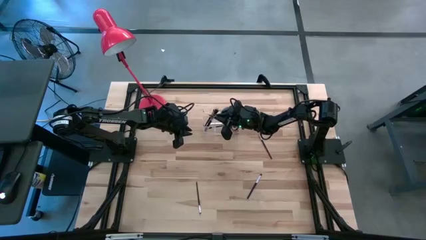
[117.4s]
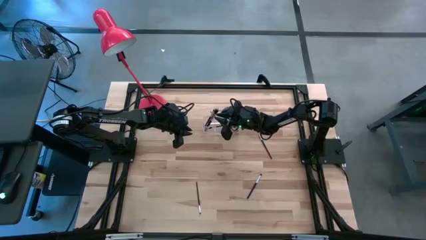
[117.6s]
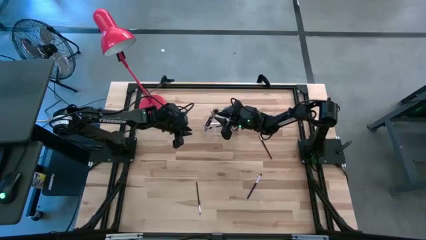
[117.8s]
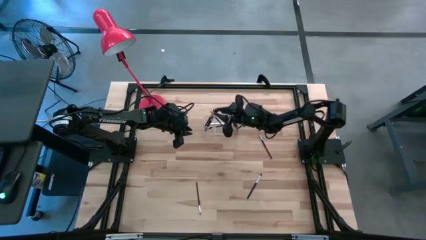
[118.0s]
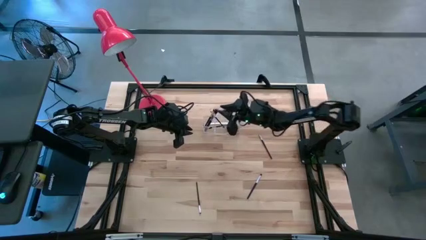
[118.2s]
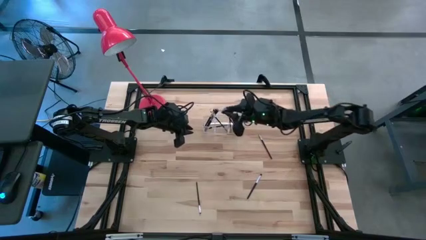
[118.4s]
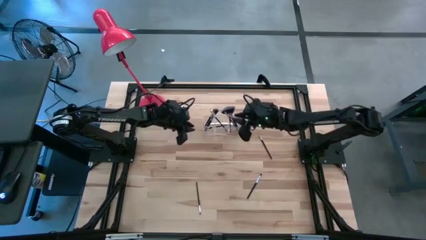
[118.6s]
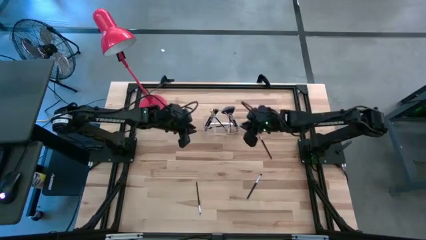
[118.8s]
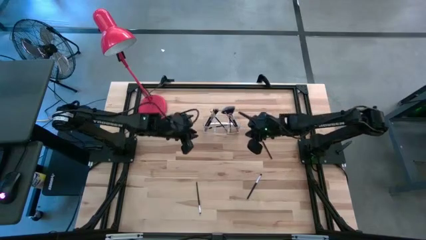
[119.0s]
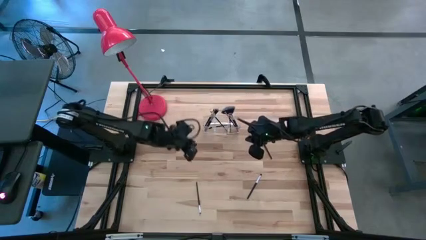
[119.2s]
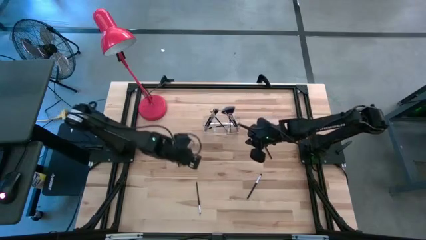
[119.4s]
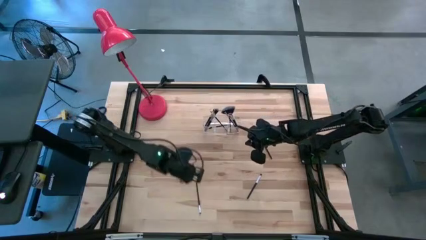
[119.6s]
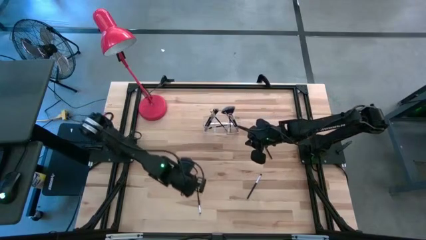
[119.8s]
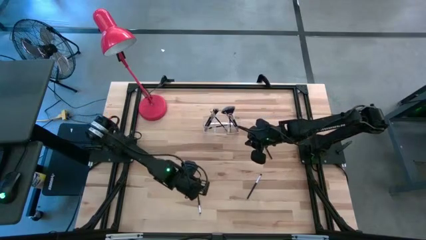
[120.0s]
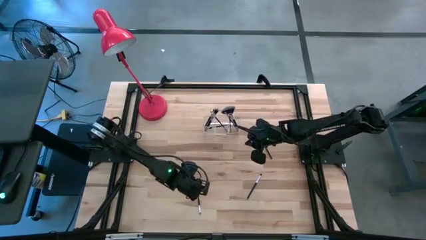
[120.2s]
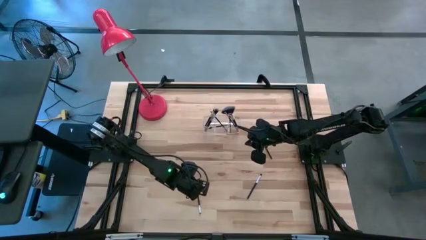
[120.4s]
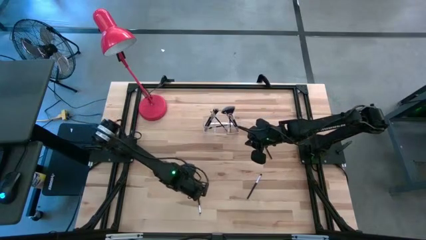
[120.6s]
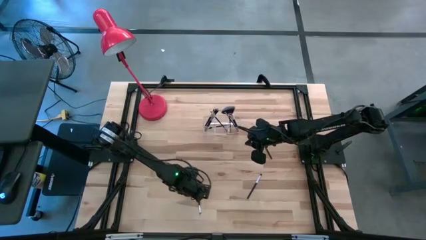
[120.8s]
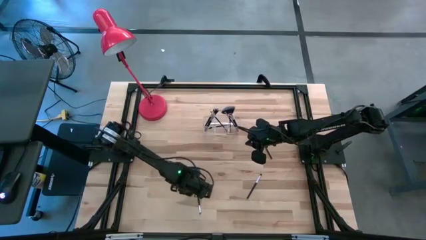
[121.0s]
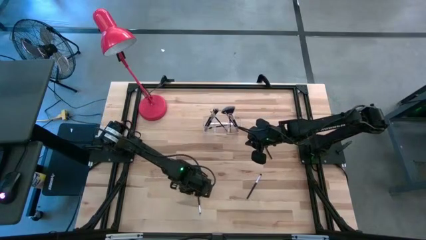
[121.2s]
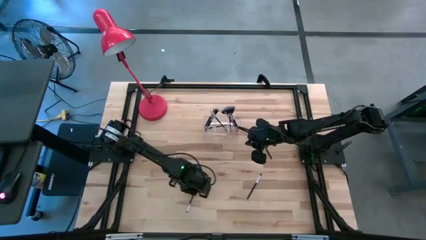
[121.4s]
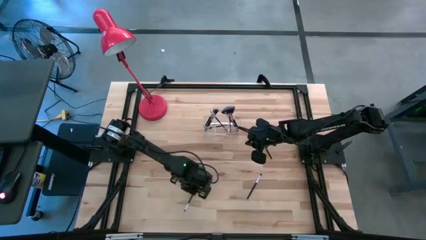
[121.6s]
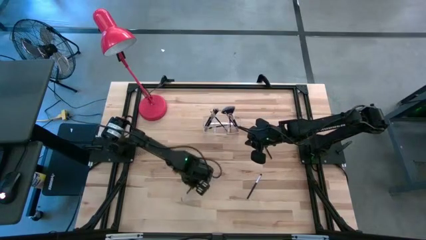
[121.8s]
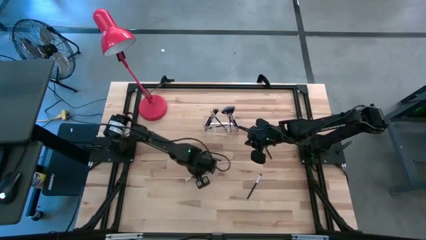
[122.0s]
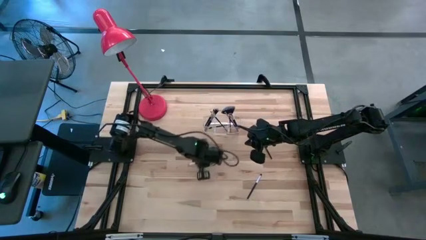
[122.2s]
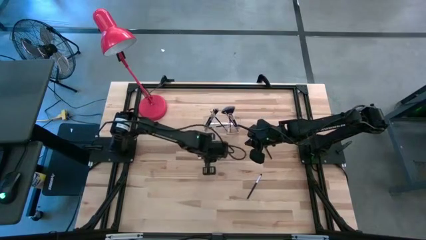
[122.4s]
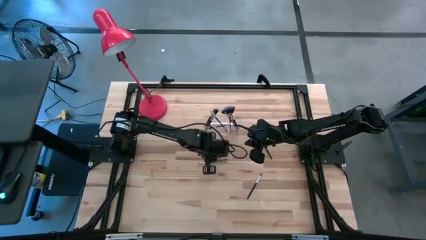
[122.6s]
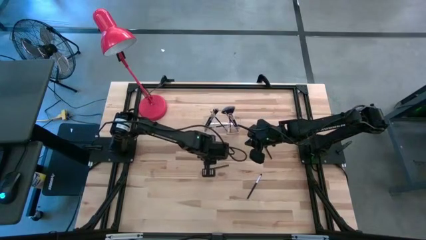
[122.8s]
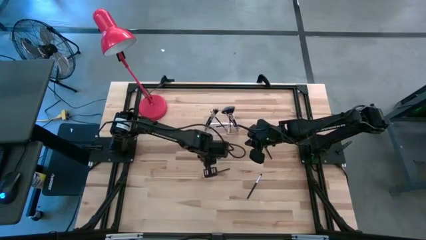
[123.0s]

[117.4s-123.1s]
Task: Pick & Place Makeup Supplies
Put the makeup brush into the transparent organizer

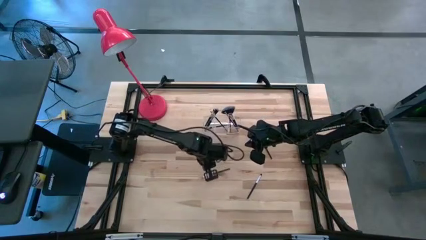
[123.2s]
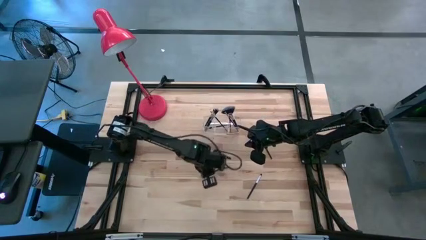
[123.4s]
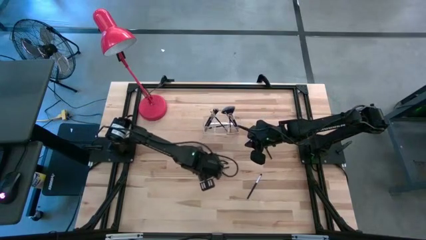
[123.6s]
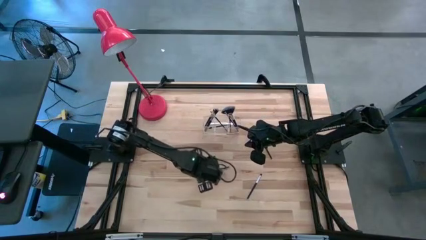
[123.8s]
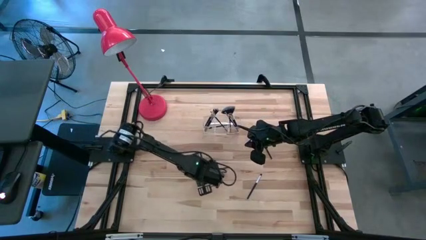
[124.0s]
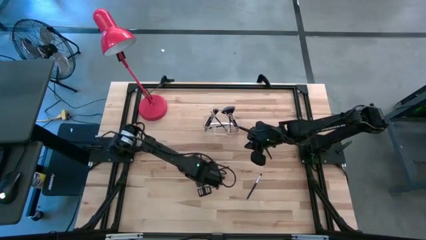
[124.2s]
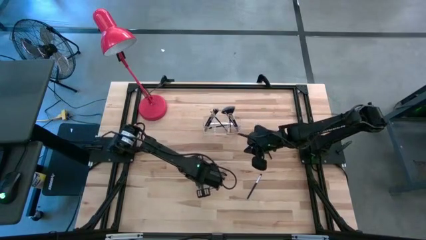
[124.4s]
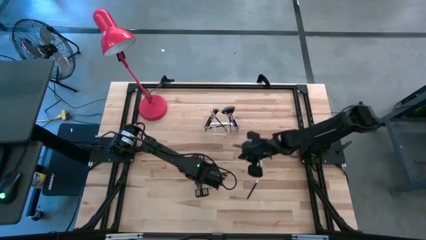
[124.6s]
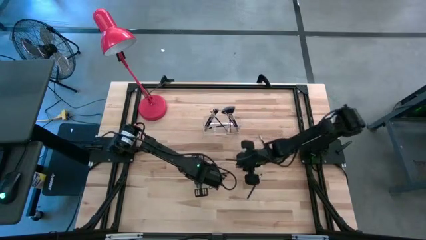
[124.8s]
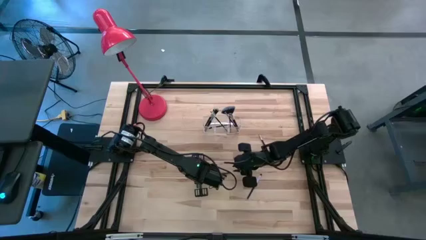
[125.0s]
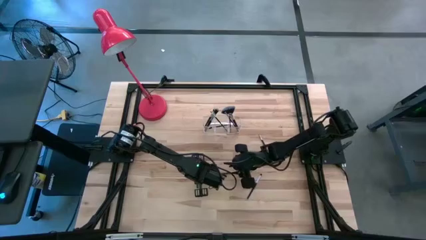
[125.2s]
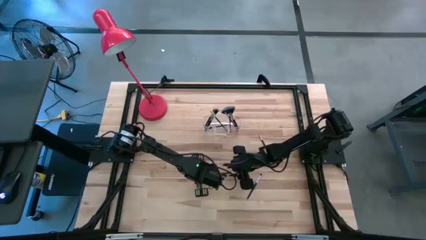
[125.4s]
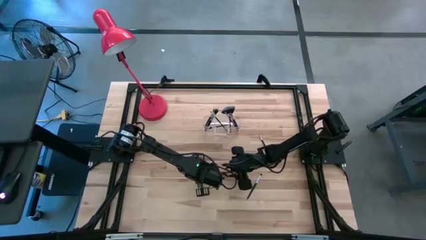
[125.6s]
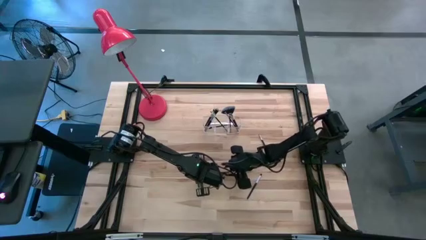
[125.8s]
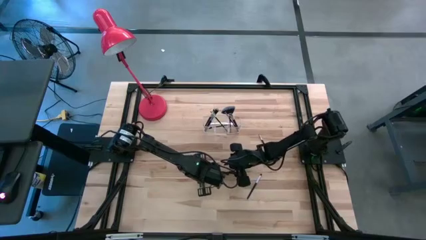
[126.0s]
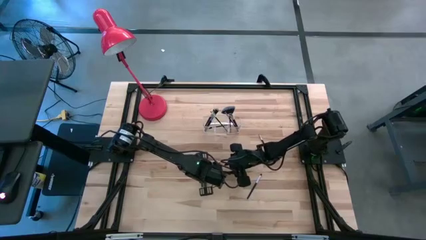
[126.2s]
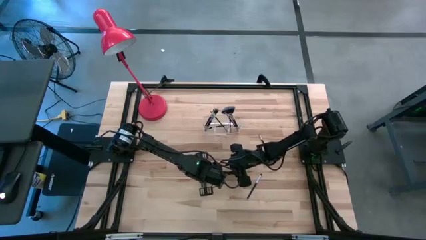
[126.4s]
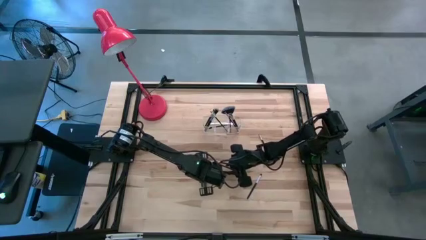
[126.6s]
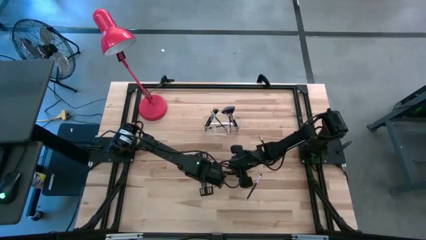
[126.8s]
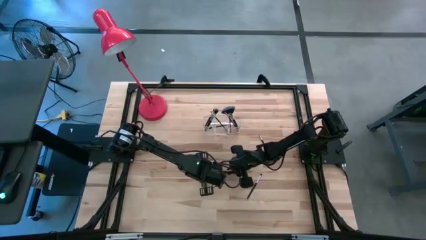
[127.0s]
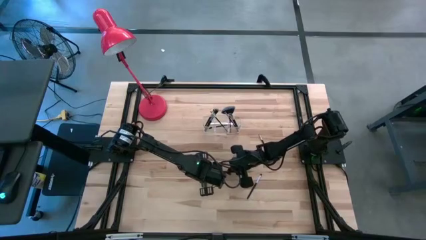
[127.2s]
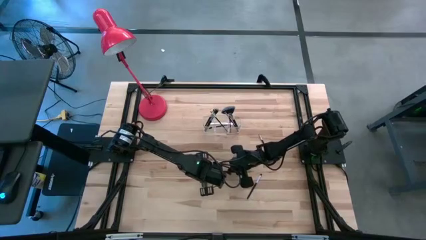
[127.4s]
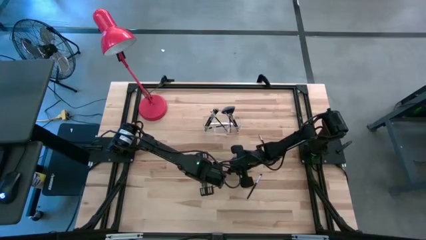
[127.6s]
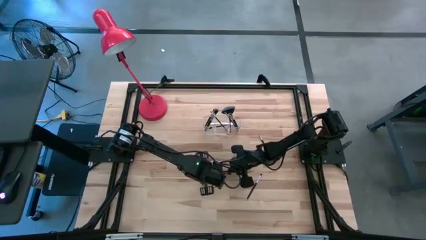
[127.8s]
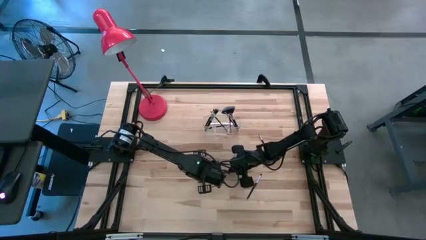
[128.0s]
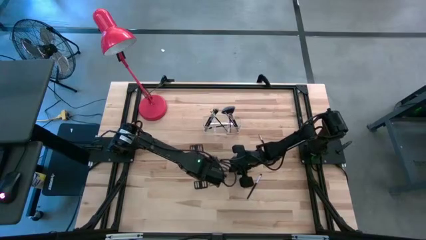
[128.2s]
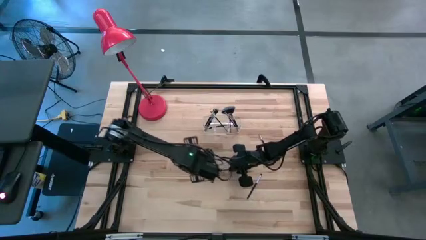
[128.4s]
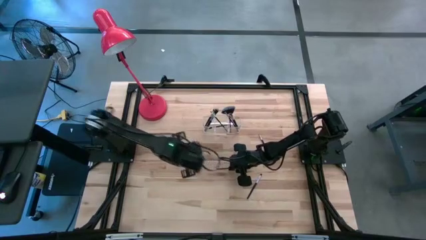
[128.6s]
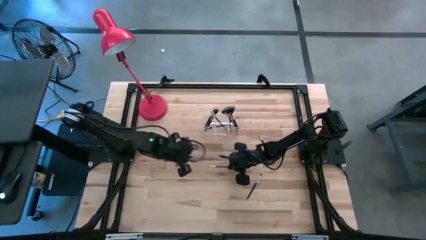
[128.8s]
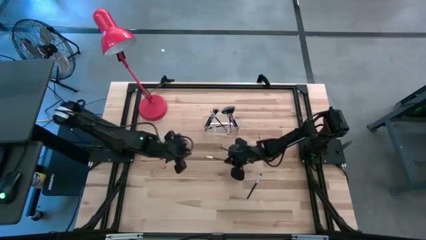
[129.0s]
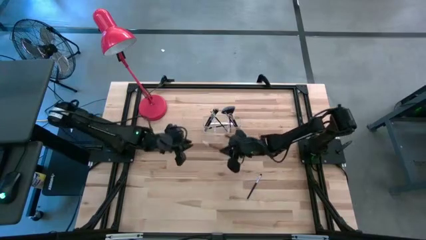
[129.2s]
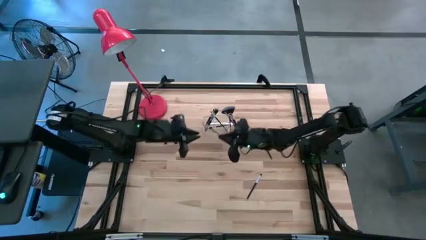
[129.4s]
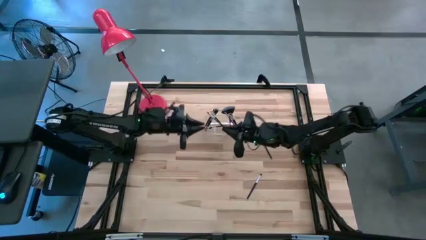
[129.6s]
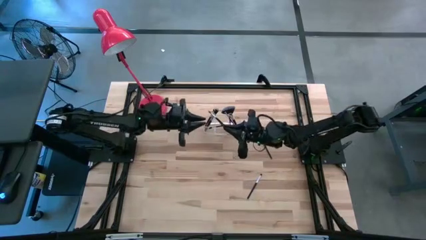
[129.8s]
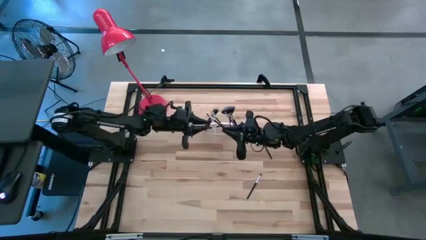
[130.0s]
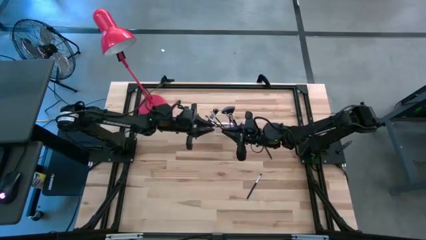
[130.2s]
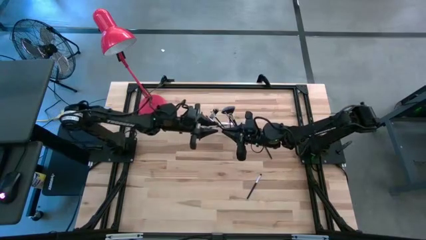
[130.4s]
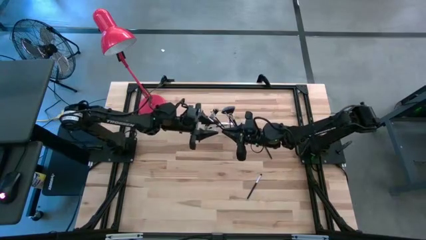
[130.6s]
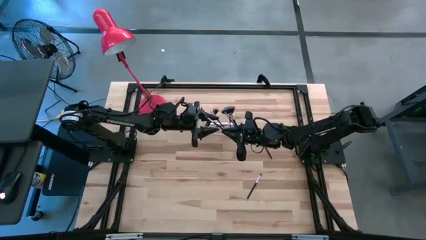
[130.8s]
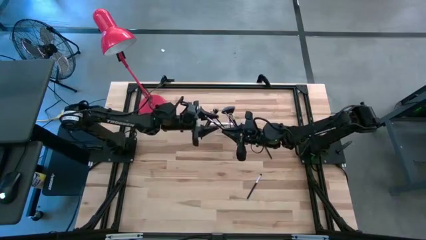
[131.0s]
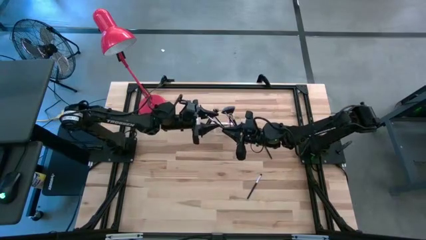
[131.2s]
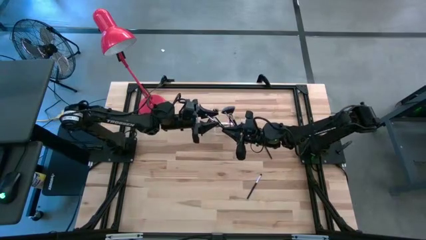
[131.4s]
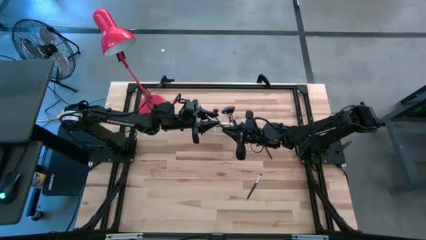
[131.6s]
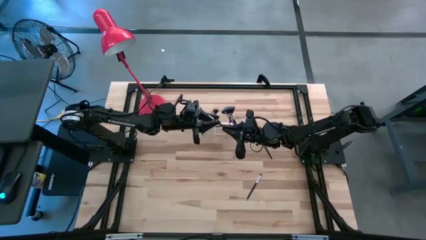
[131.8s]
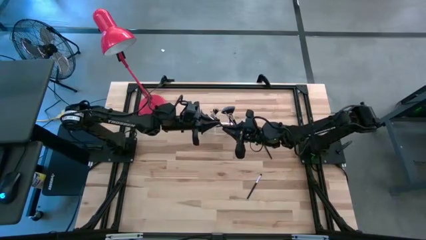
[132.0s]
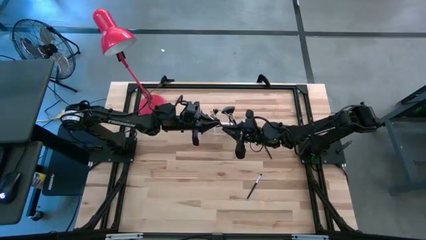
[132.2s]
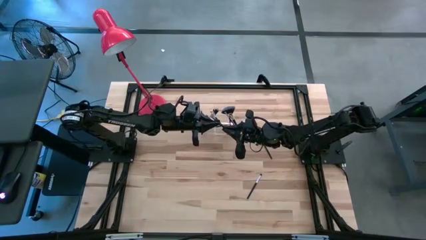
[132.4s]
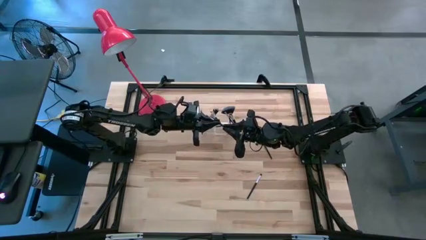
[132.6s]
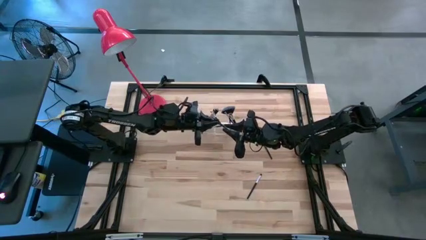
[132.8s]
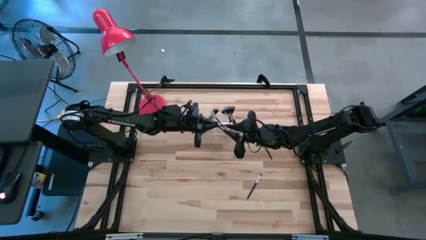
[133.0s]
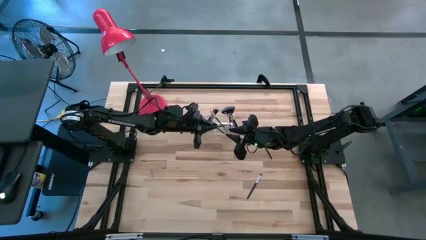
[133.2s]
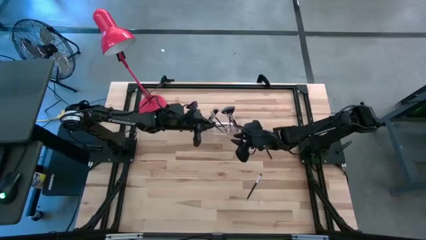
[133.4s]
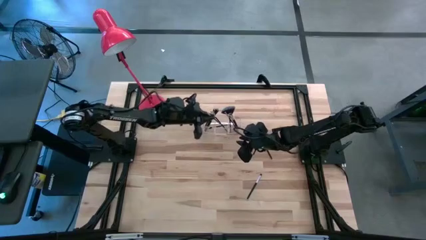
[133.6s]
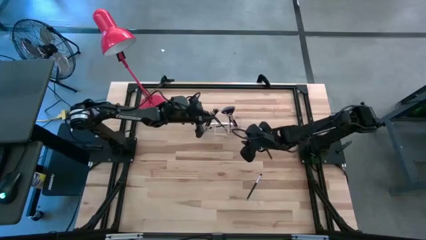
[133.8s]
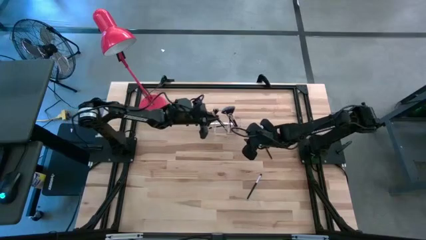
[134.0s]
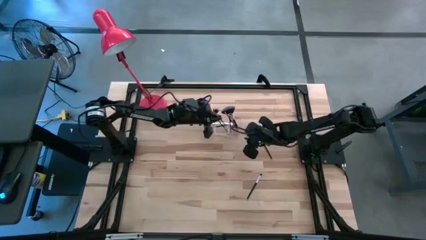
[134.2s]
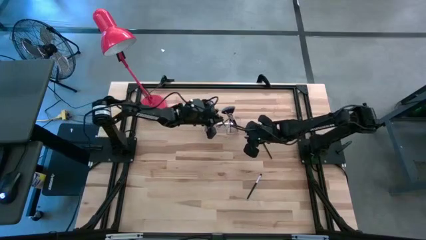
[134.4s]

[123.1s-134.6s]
Put the makeup brush into the transparent organizer
